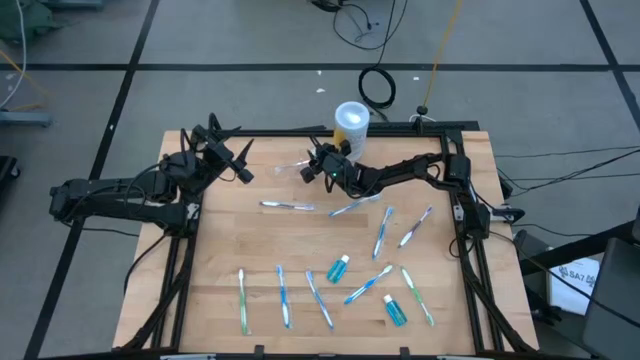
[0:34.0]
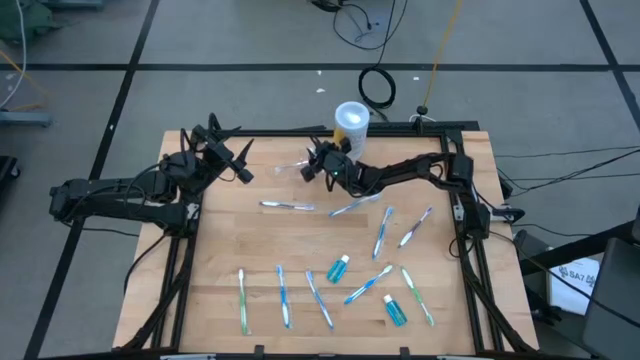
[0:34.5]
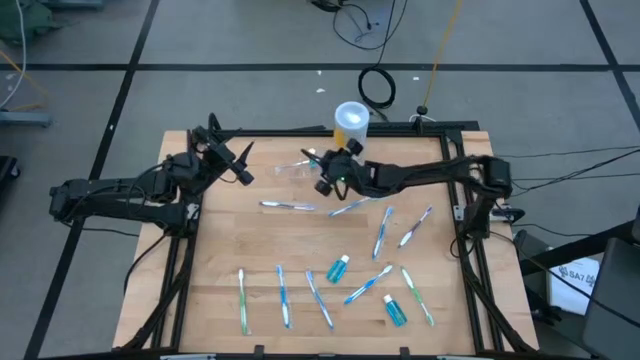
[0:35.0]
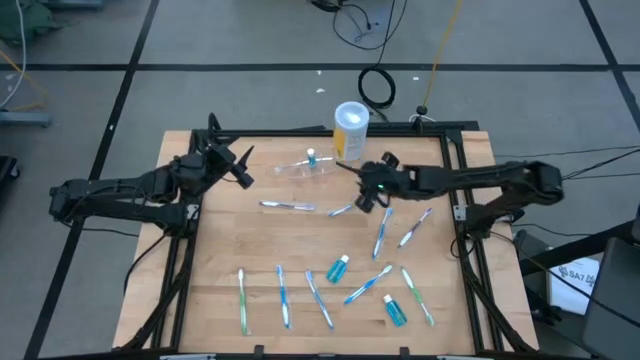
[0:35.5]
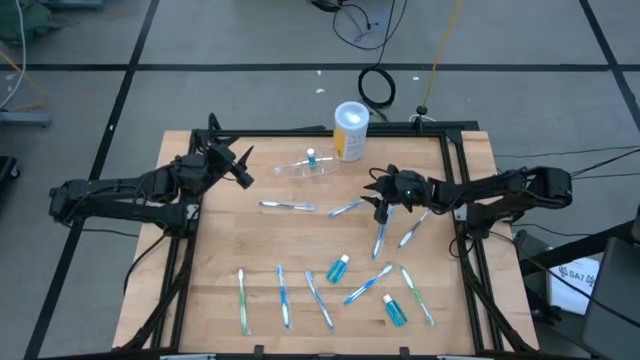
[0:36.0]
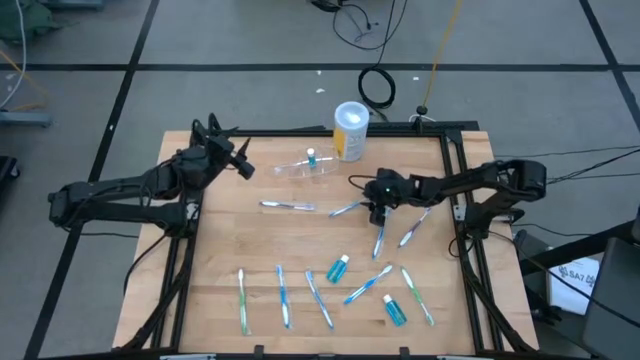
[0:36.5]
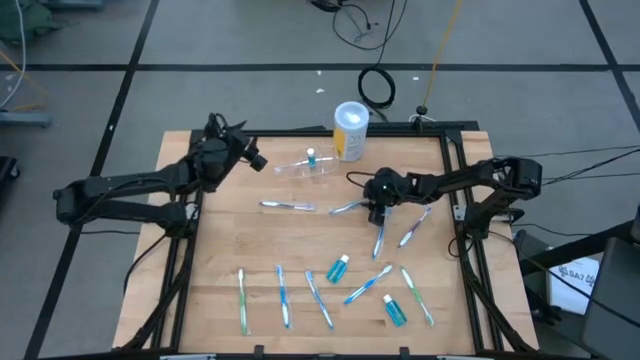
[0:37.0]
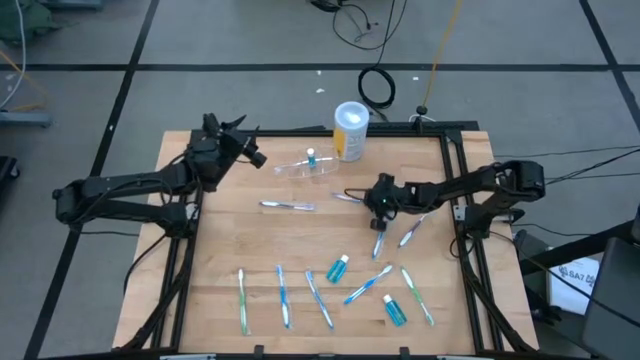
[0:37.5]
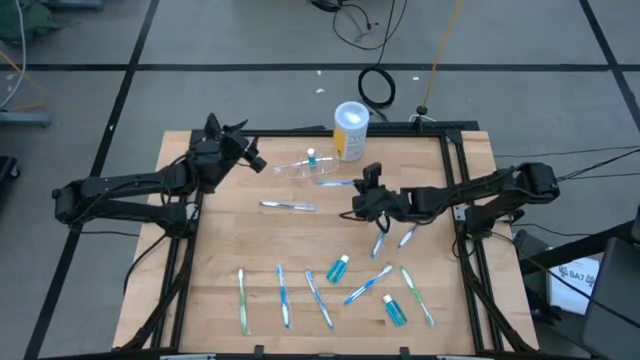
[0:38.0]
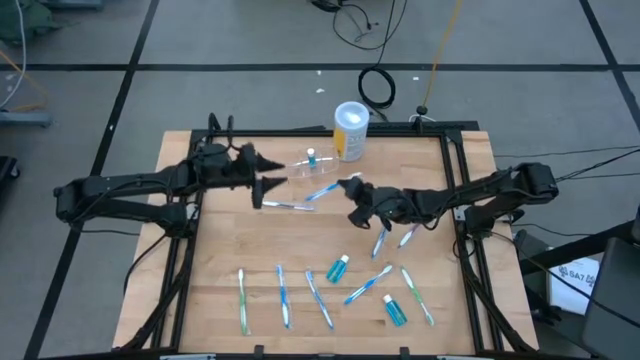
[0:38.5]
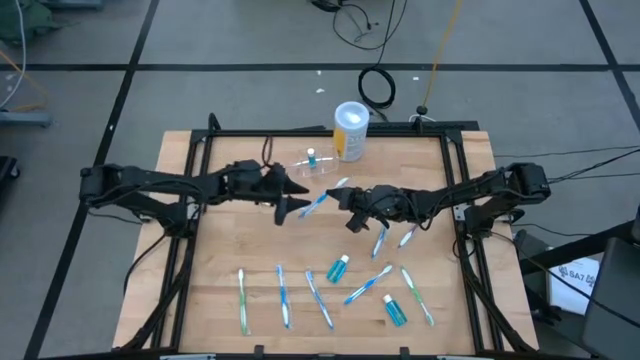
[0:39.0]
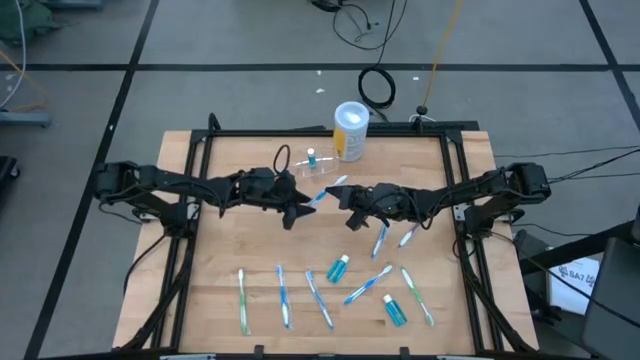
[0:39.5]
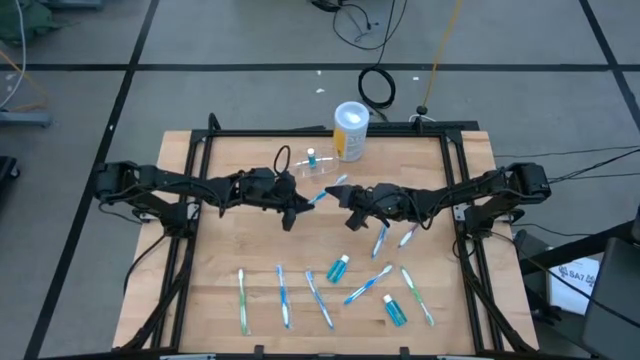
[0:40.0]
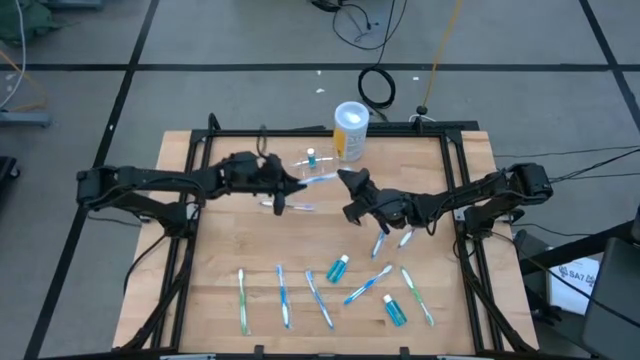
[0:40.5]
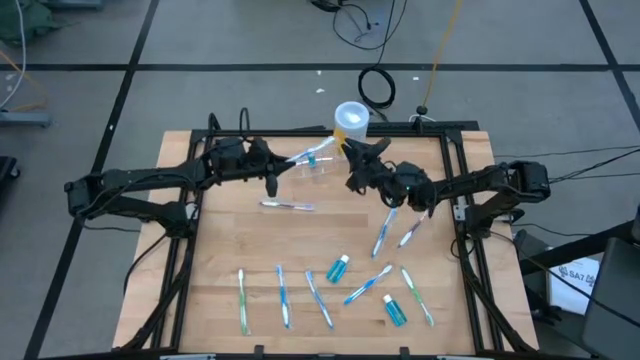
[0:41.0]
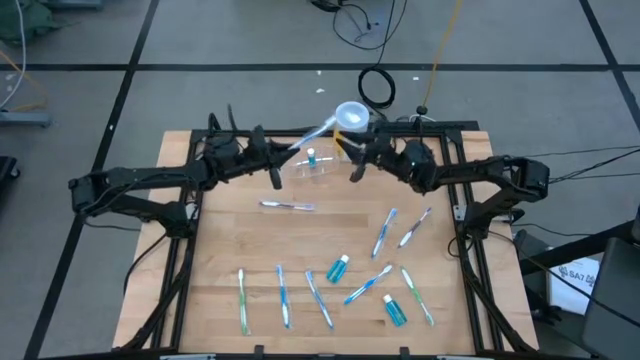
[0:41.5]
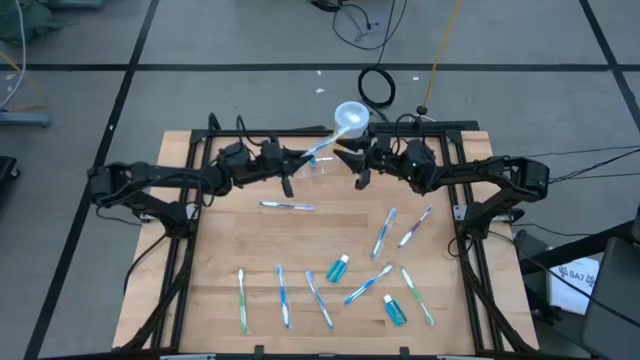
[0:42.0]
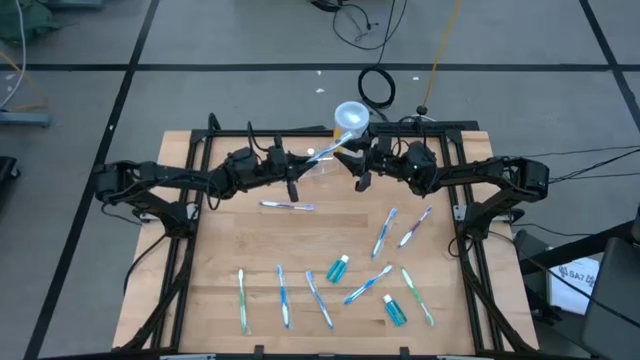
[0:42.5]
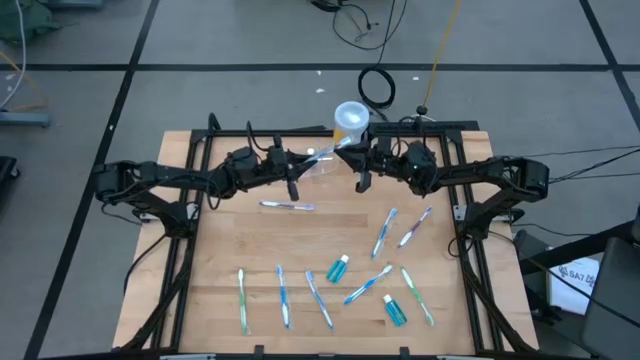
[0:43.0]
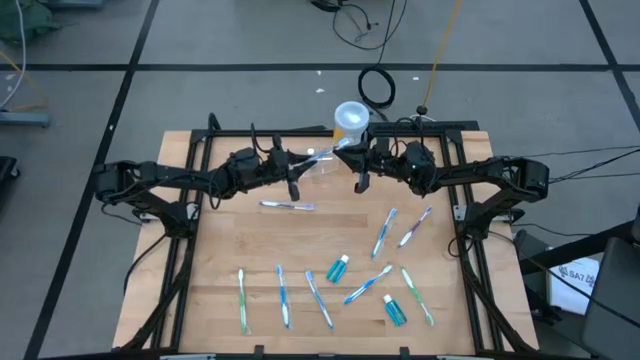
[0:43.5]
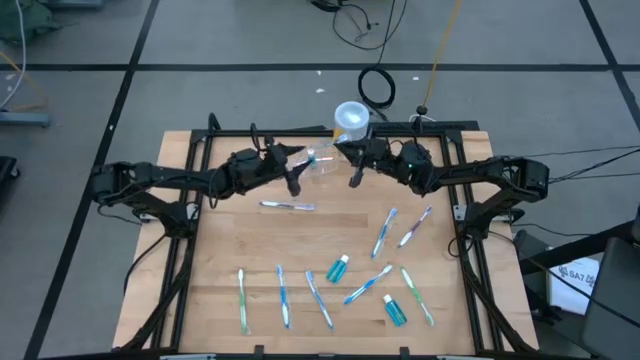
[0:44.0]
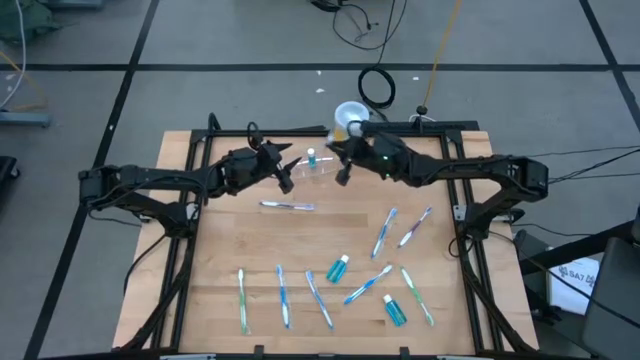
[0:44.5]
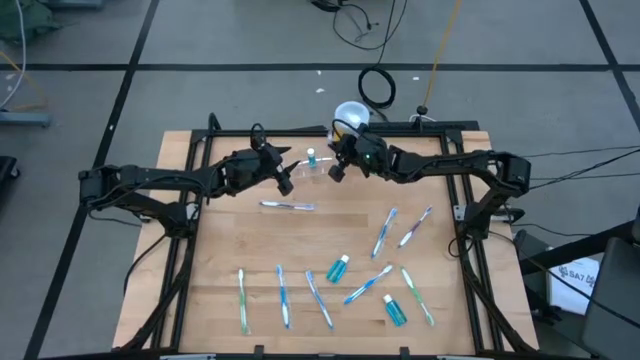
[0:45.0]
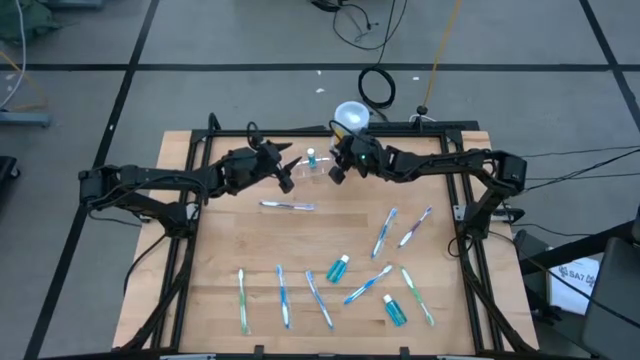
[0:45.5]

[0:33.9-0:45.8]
Task: Pick & Place toothbrushing station
Put the blue toothbrush into the right section of the transparent organizer

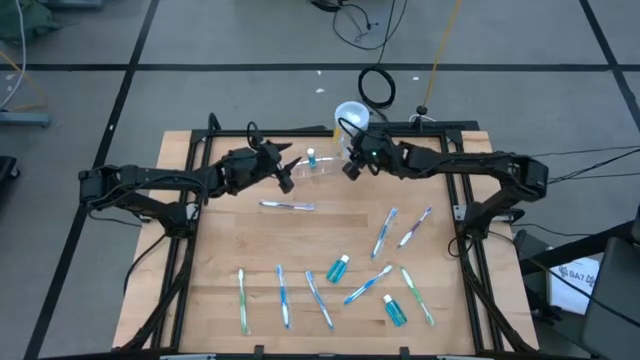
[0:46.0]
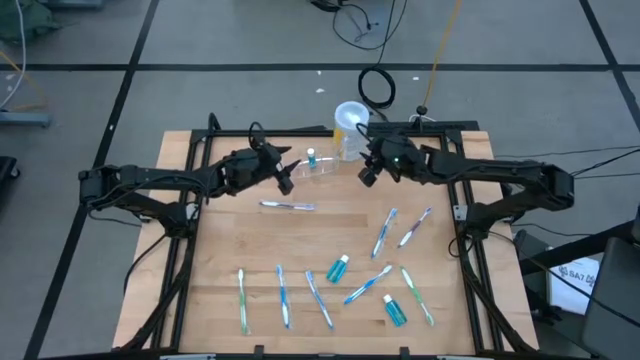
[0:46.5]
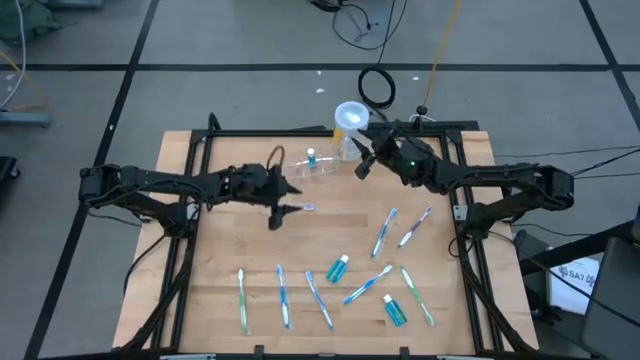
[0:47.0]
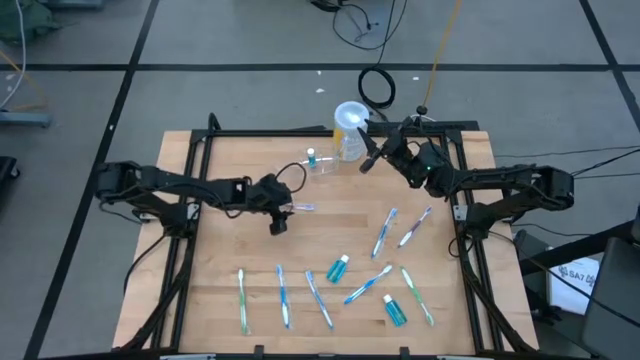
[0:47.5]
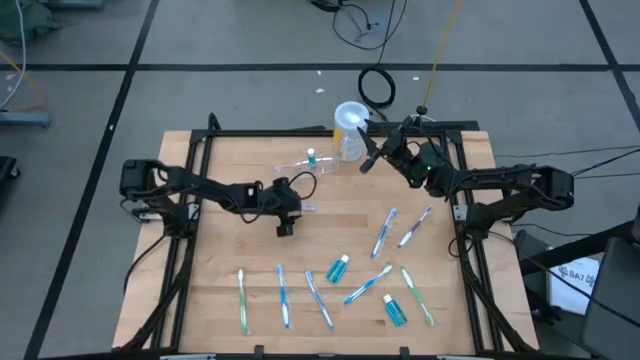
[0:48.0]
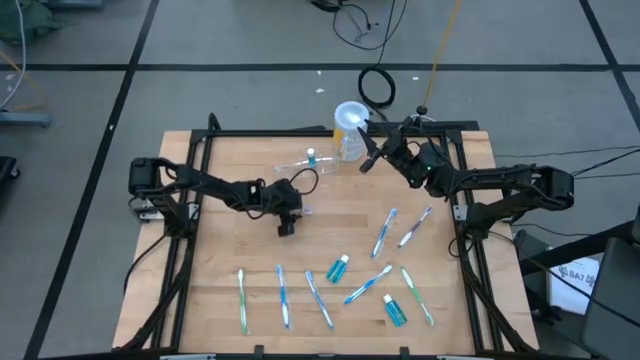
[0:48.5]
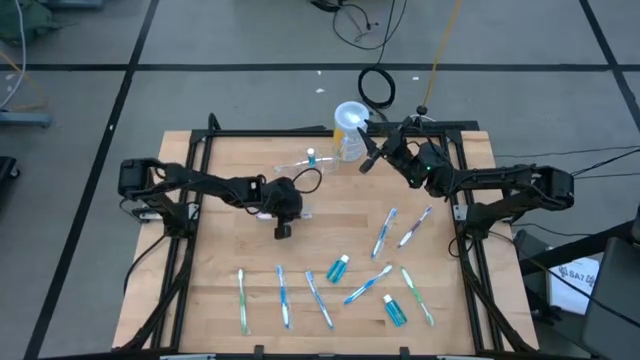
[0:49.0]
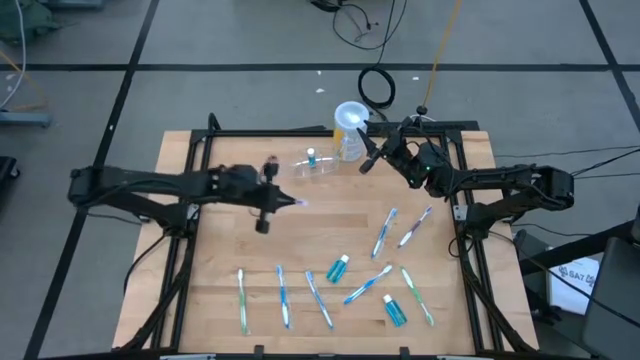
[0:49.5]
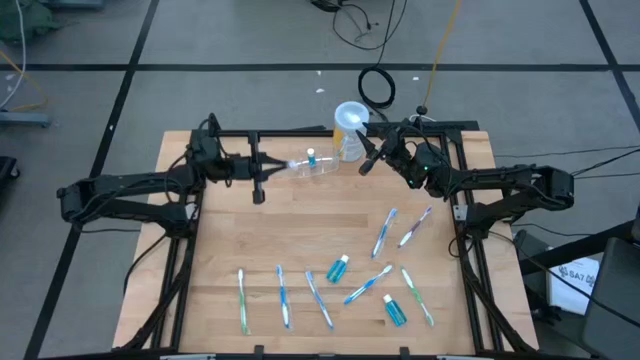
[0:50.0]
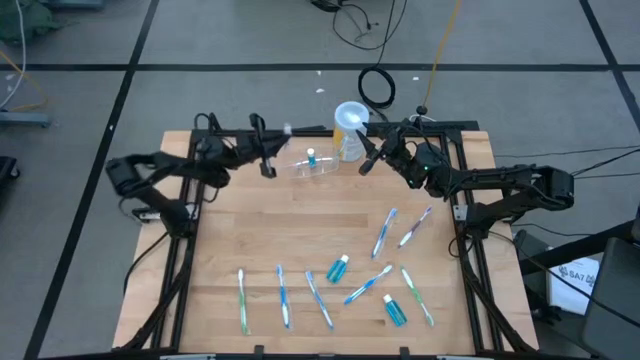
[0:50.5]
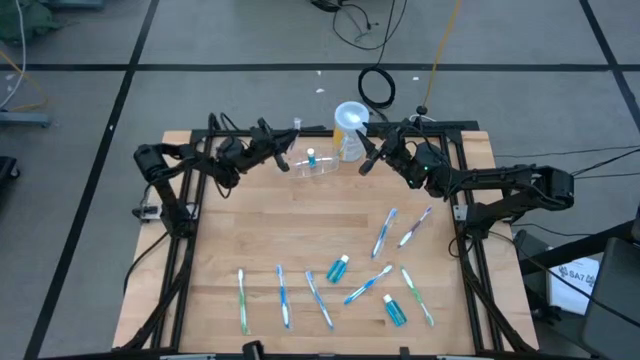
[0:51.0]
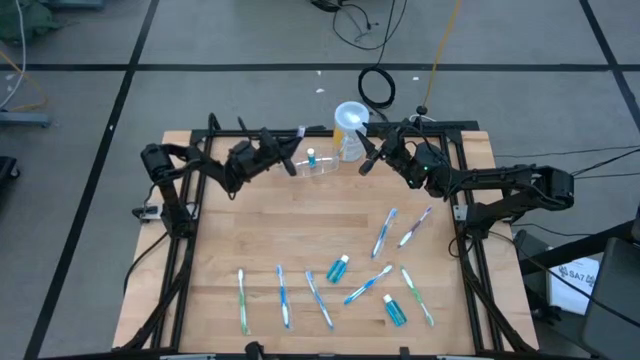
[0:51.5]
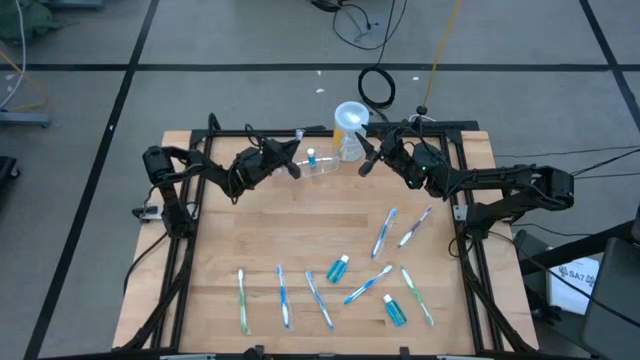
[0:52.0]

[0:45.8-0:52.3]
Put the top violet toothbrush into the left section of the transparent organizer

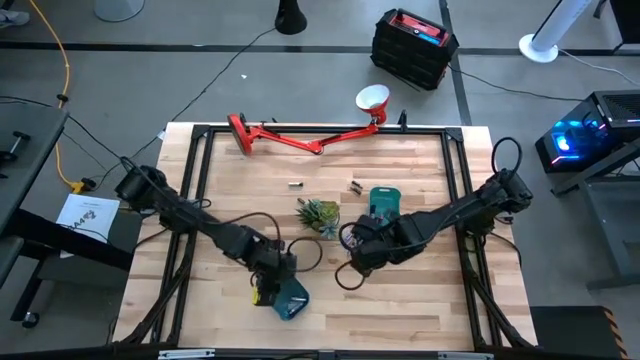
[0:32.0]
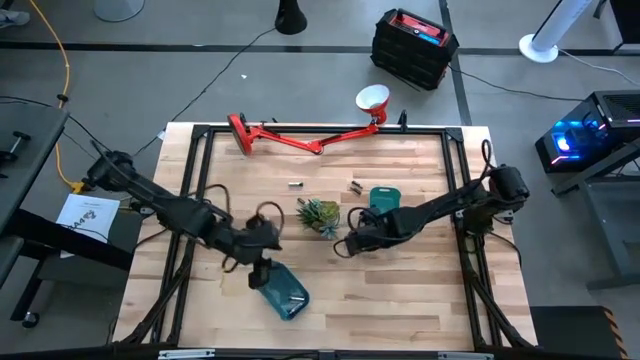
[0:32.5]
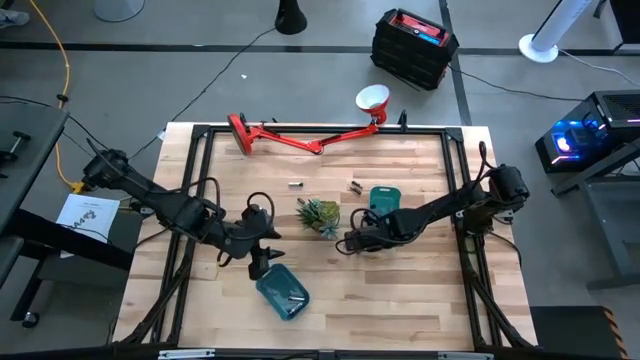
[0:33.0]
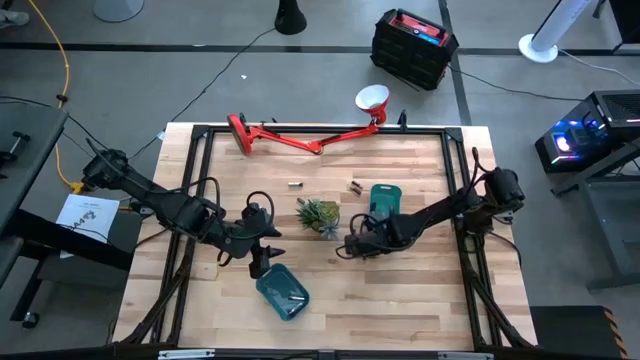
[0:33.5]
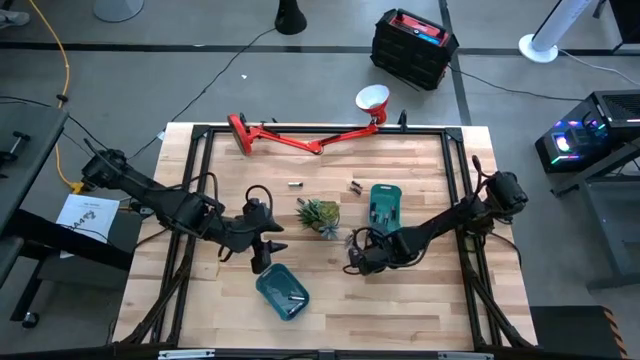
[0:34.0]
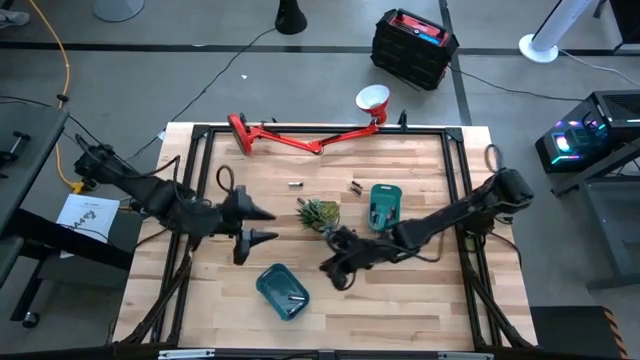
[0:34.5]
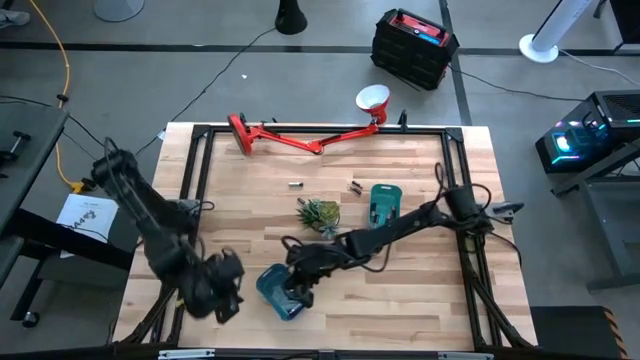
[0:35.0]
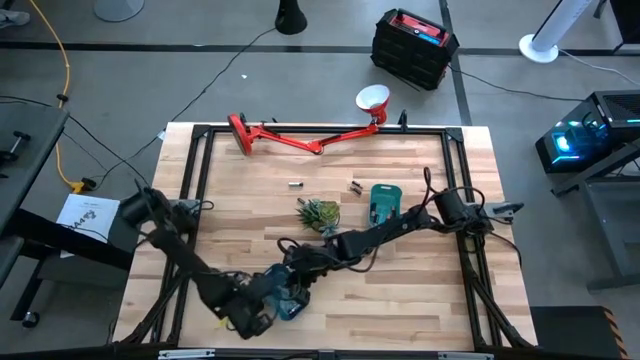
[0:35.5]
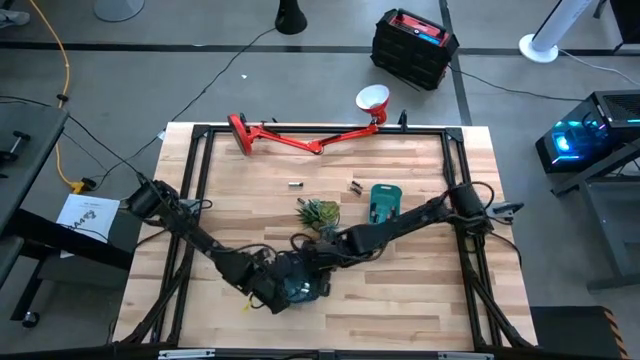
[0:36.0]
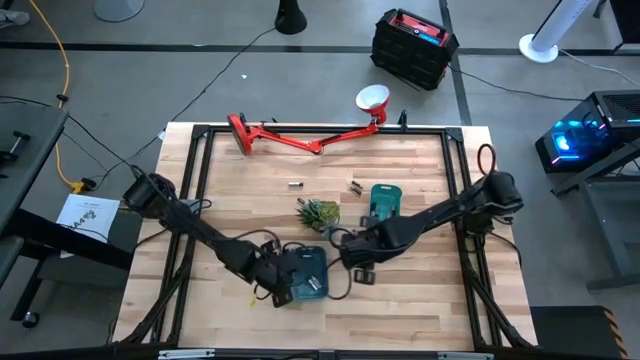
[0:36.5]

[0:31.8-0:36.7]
Task: Sort batteries
Put the silver battery into the blue bin

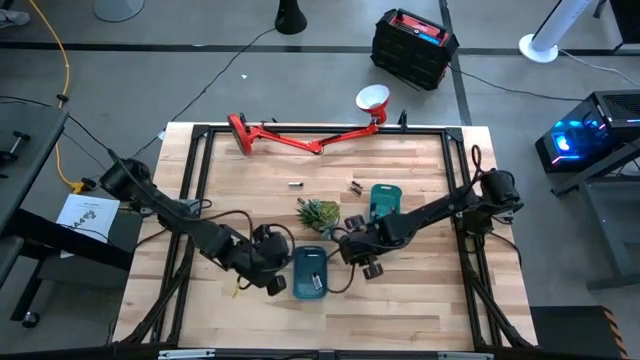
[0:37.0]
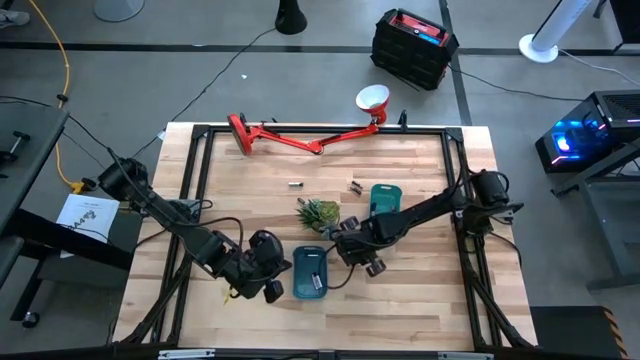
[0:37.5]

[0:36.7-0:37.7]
Put the silver battery into the blue bin
